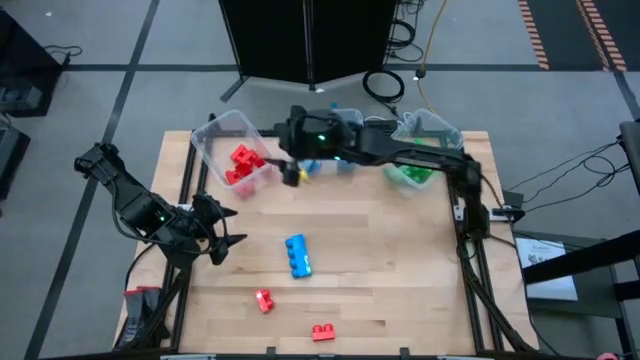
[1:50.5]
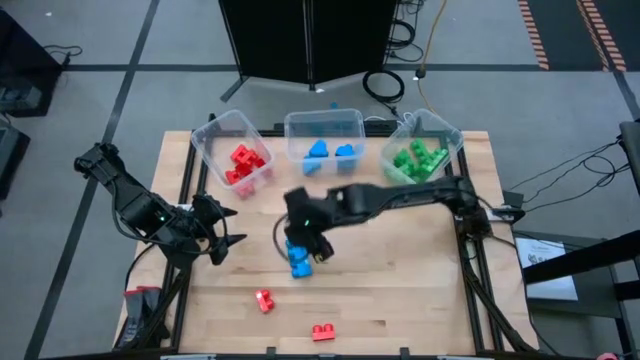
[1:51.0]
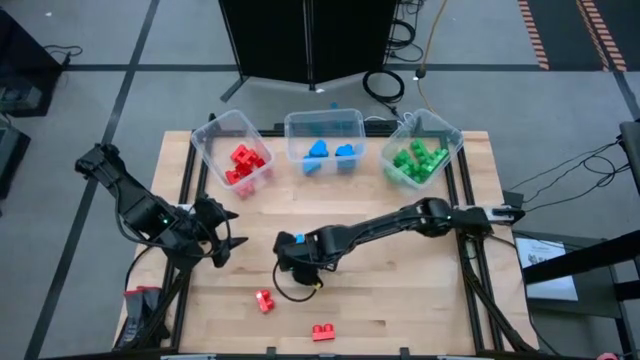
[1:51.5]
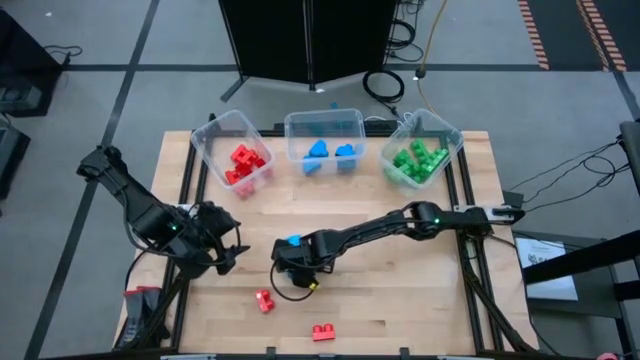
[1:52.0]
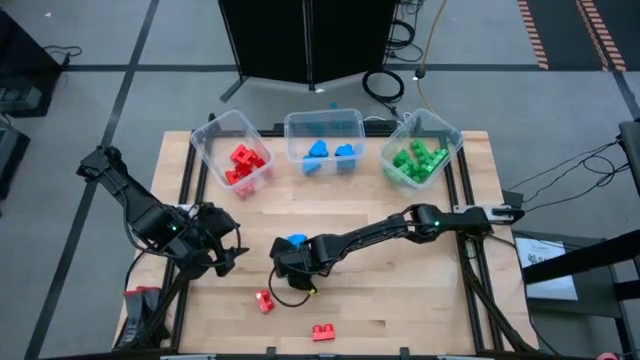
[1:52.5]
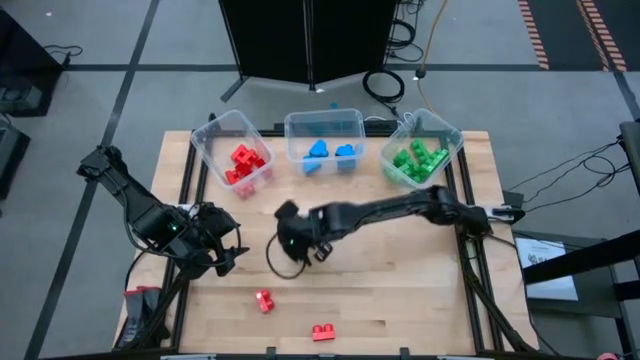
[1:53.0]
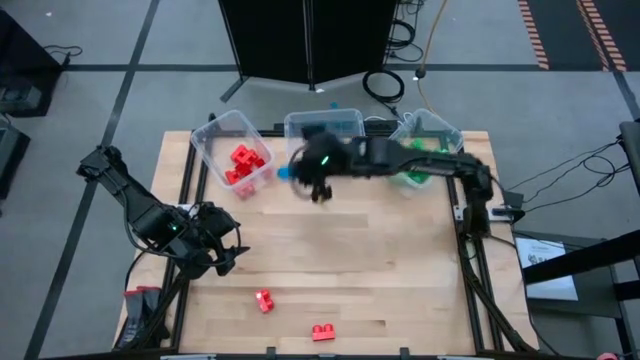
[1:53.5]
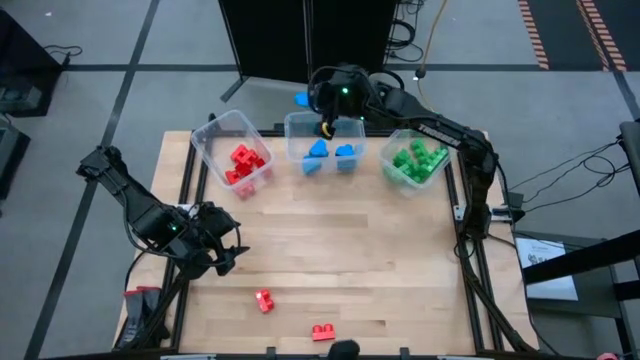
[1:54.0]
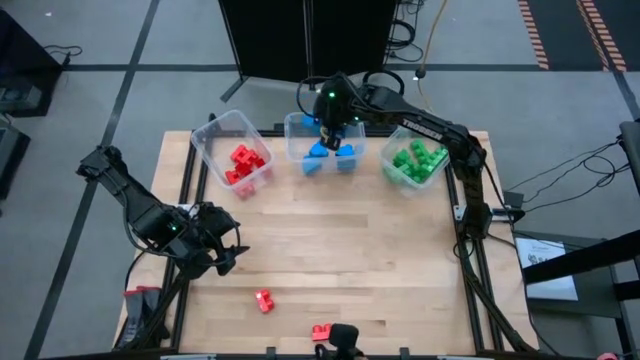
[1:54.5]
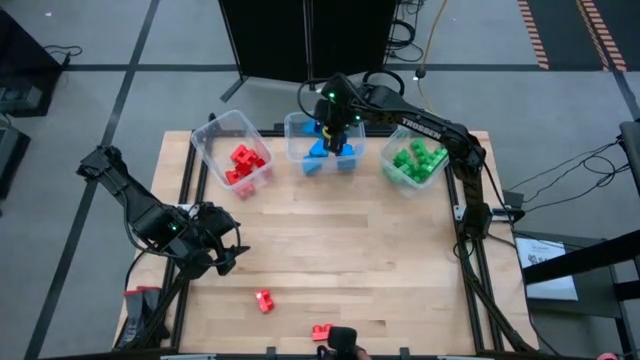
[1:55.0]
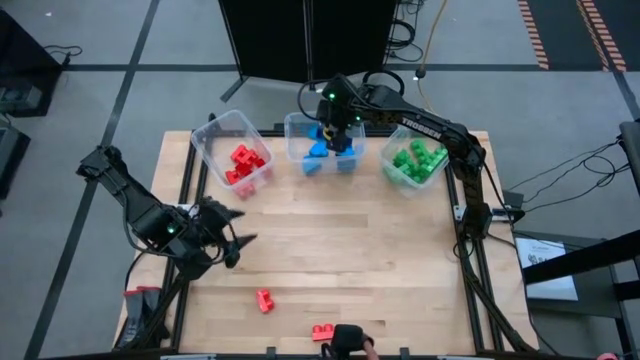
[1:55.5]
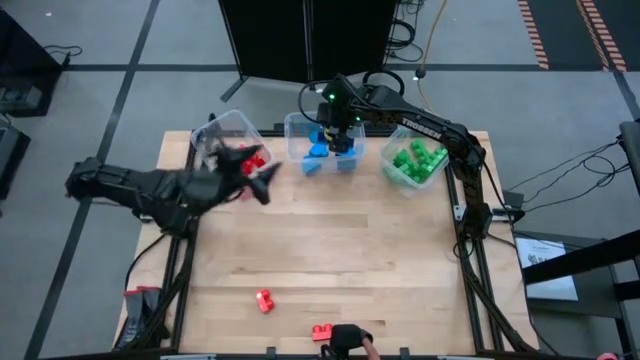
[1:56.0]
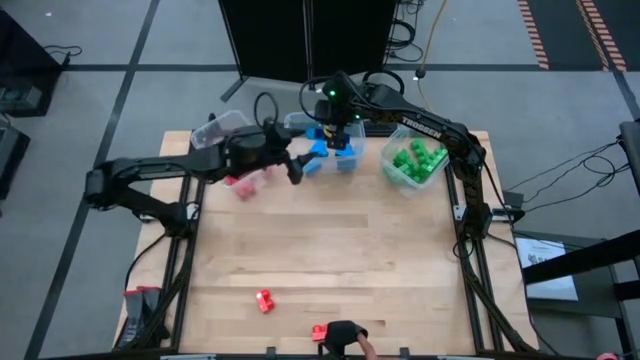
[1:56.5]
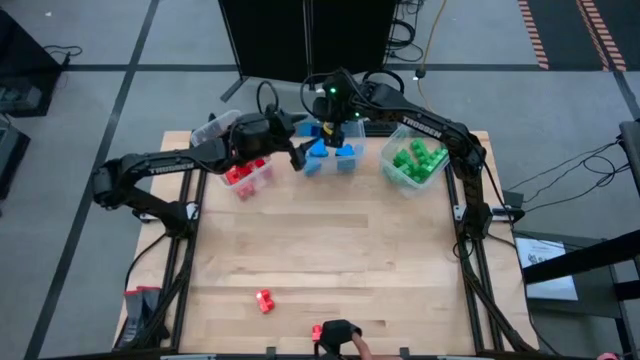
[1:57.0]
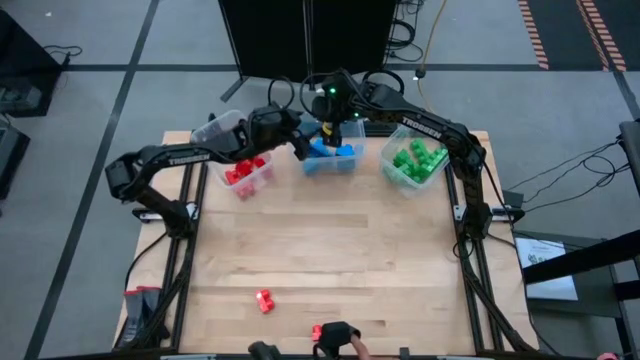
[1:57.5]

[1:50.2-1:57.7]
Task: Sort blocks
Put the blue game piece into the middle transparent bin

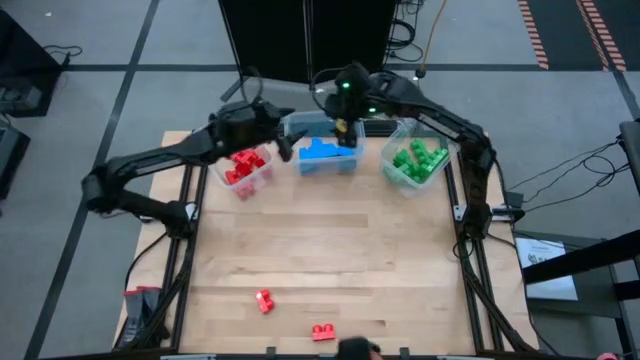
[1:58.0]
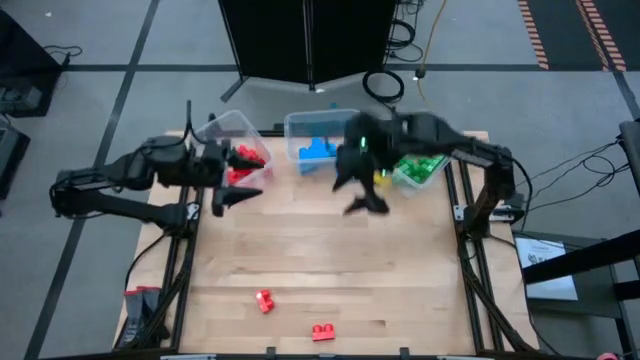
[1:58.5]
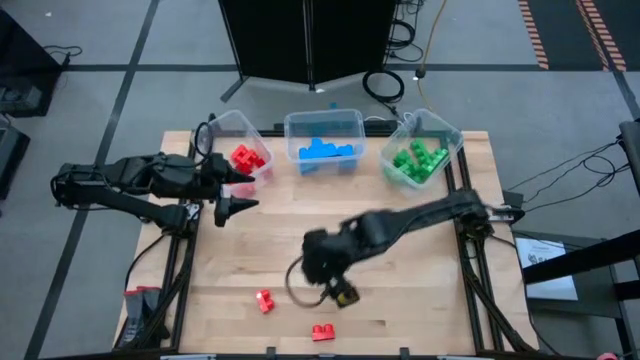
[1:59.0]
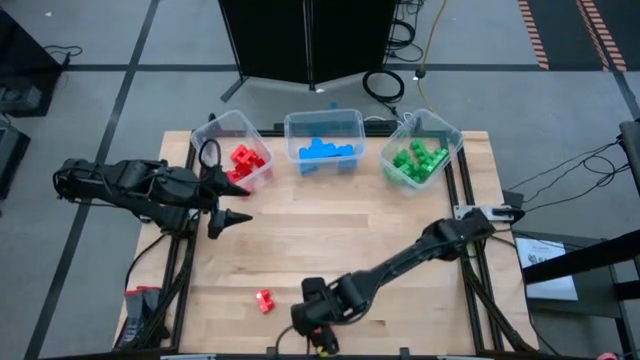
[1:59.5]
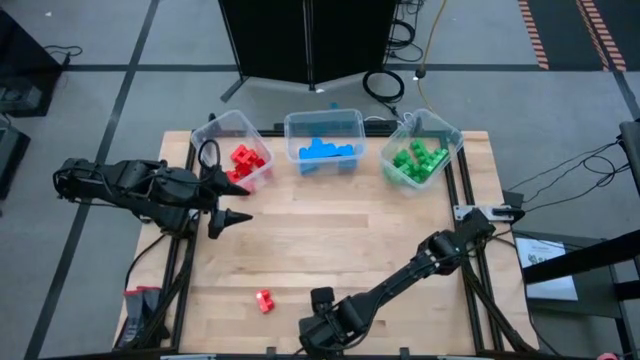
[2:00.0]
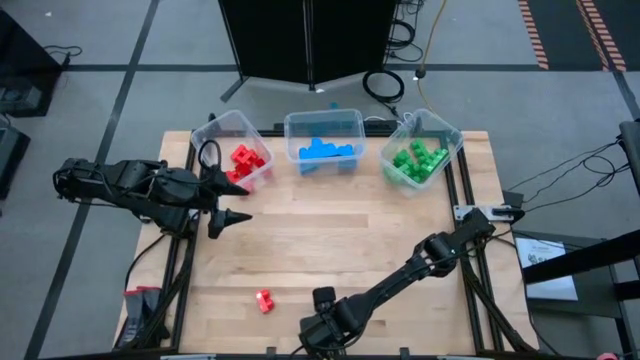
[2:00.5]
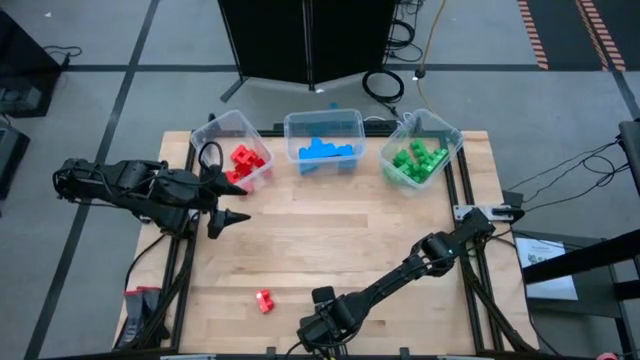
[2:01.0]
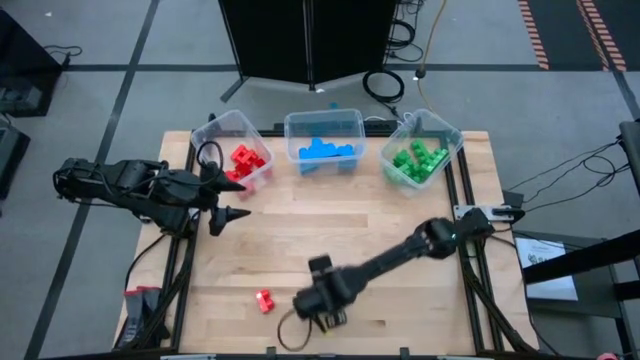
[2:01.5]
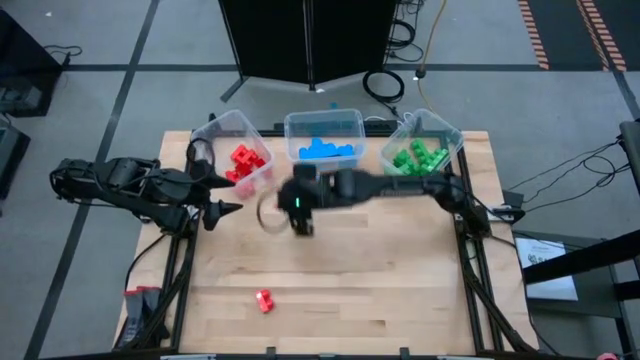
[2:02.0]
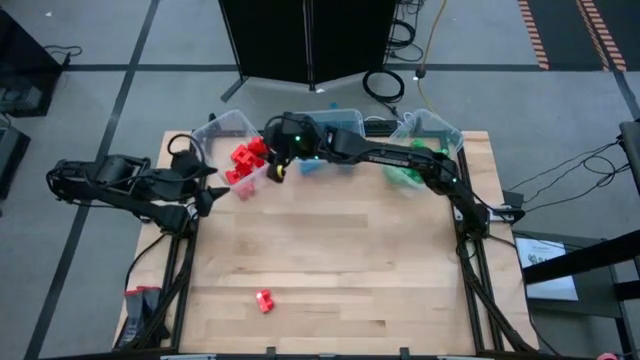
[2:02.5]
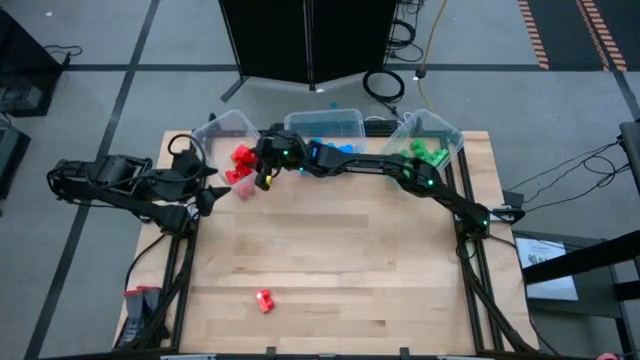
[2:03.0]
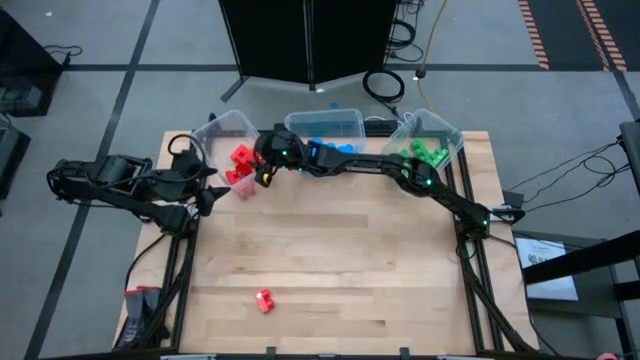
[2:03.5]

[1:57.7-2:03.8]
Put the red game piece into the left transparent bin

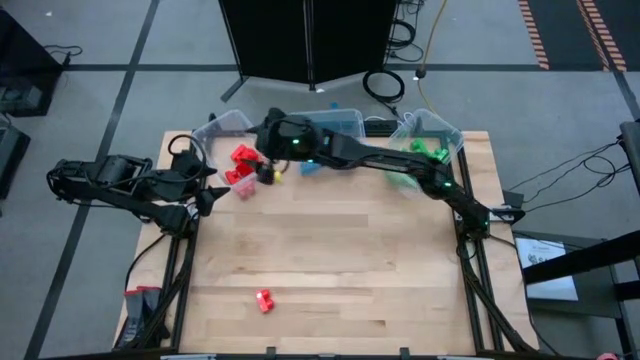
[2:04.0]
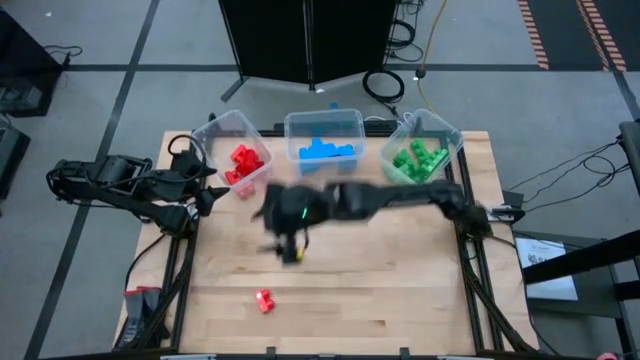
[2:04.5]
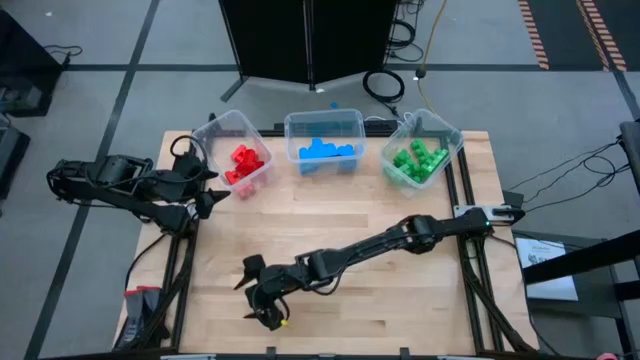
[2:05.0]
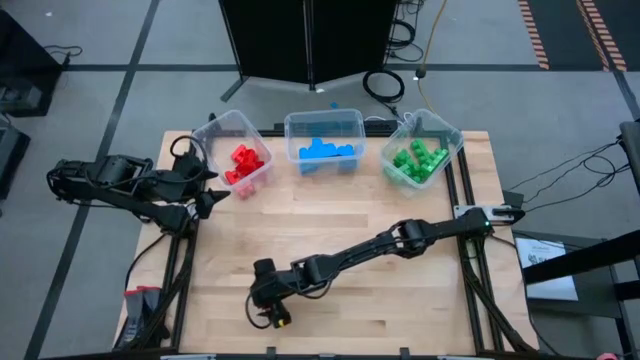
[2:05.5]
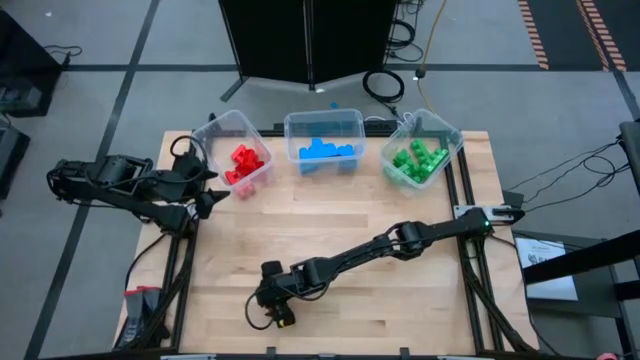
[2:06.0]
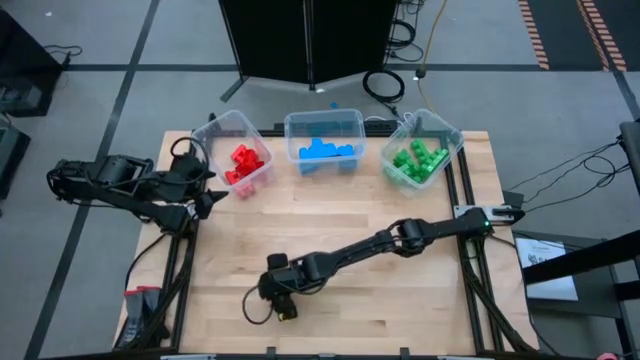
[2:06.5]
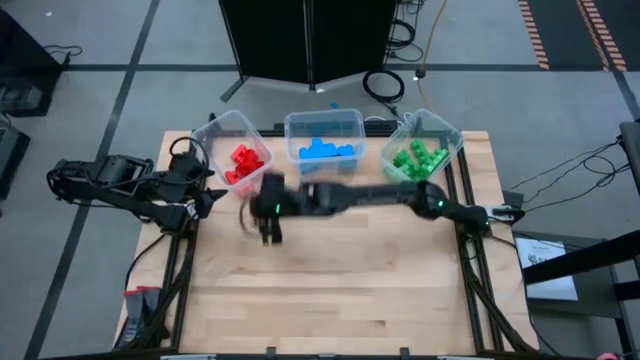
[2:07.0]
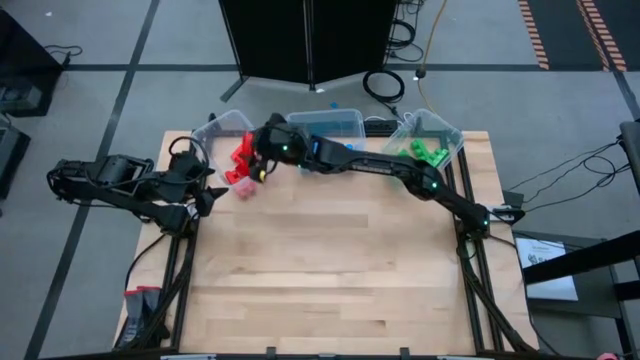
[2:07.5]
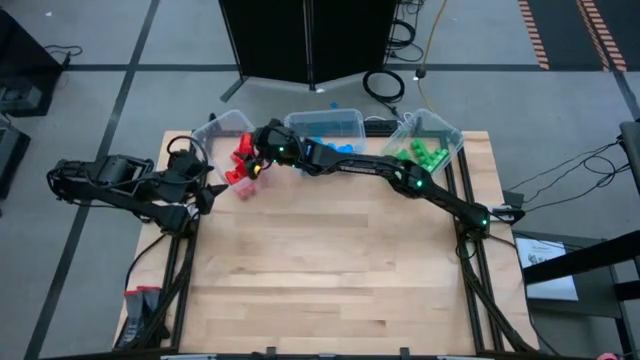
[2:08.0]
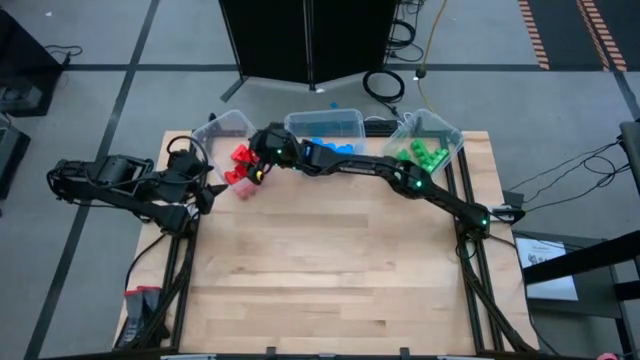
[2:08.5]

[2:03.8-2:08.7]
Put the red game piece into the left transparent bin

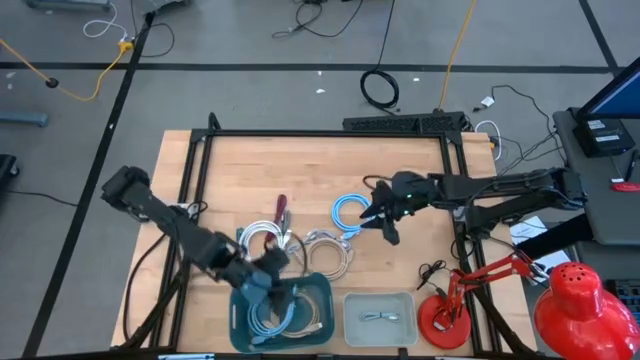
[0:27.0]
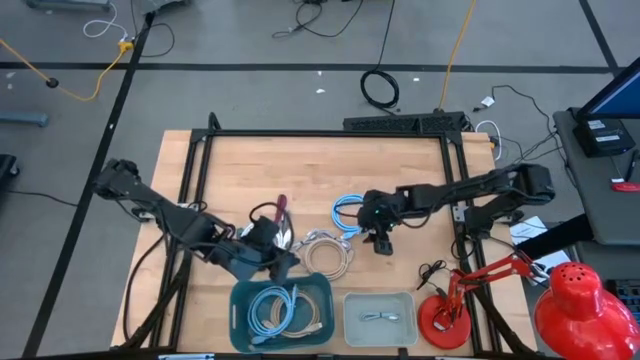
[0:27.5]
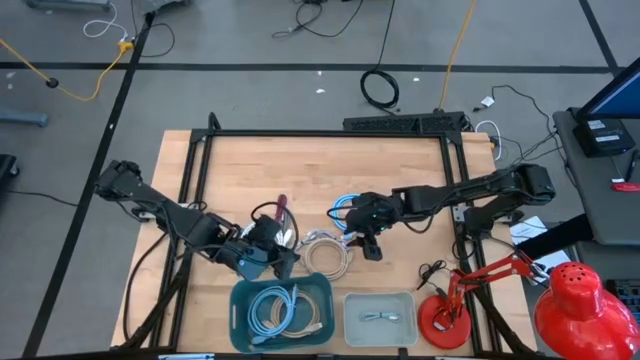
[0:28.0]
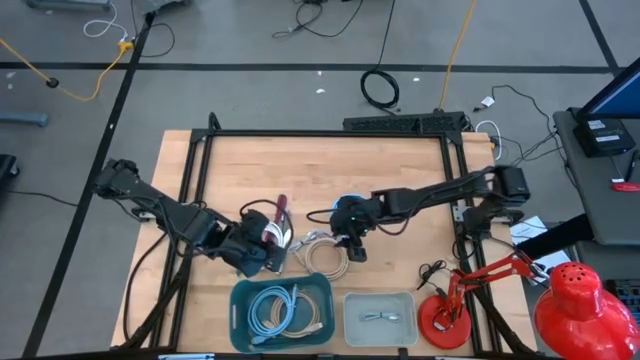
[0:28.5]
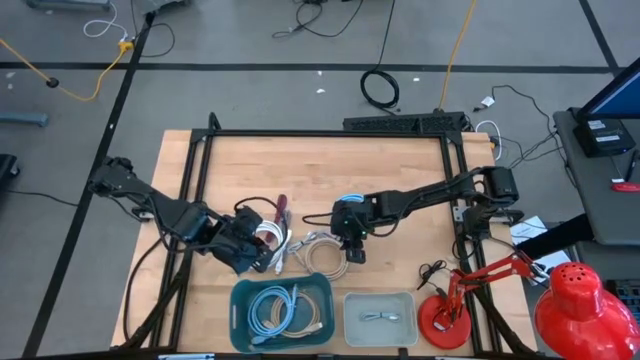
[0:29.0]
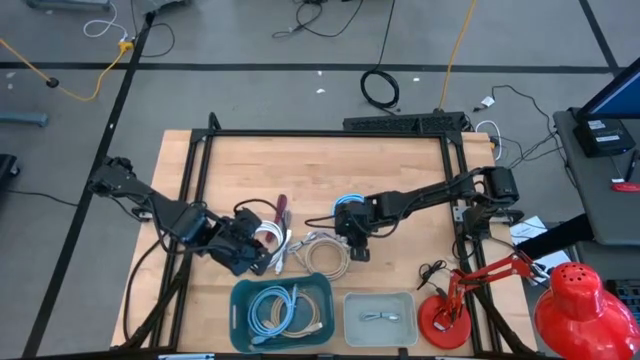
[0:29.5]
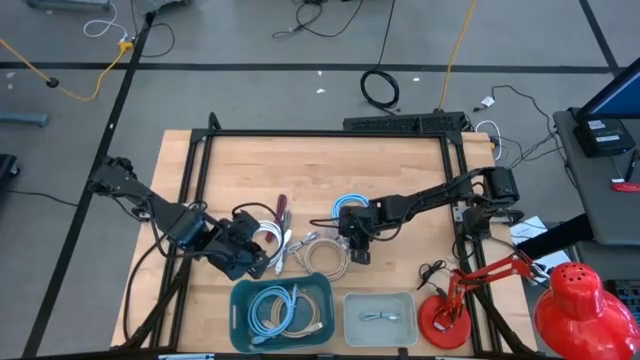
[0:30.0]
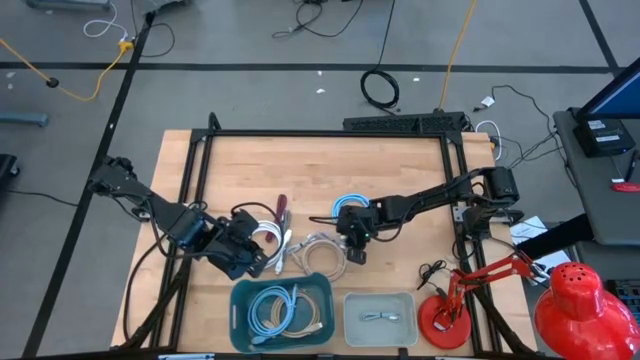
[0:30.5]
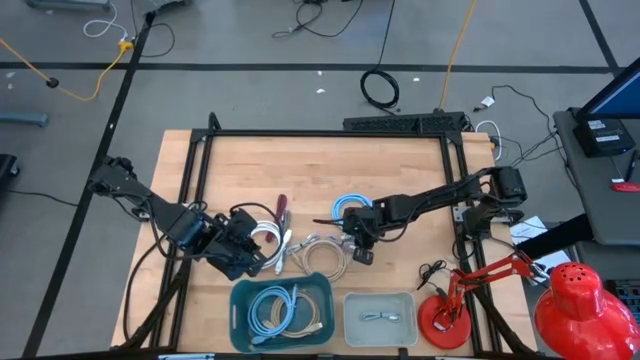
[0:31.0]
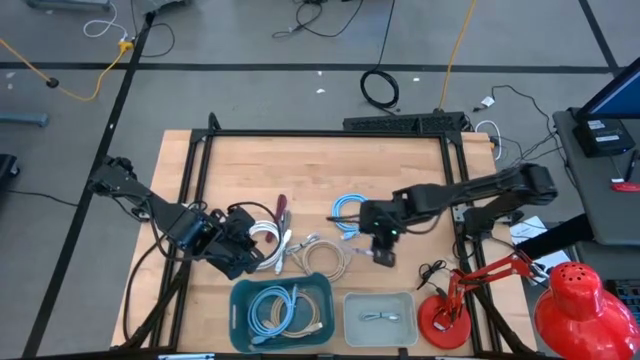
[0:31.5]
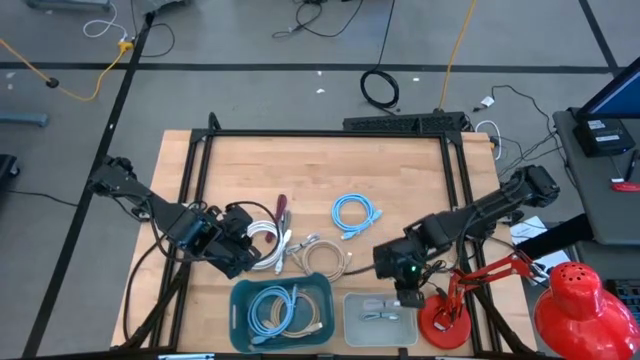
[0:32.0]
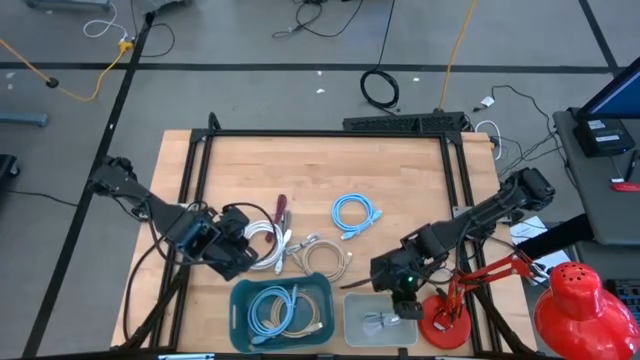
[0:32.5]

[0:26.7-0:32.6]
Task: Pick & Place USB Port
Put the small violet charger cable into the grey bin
